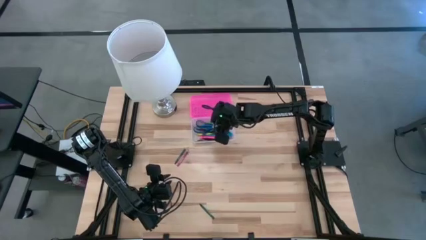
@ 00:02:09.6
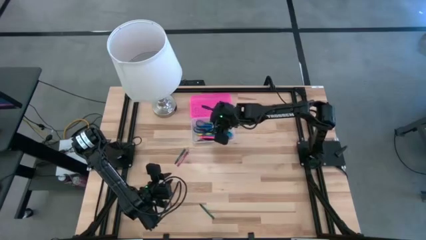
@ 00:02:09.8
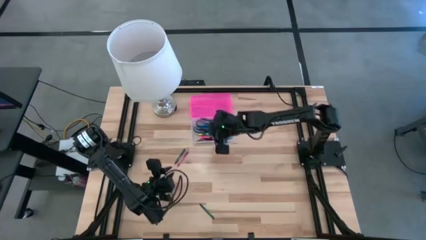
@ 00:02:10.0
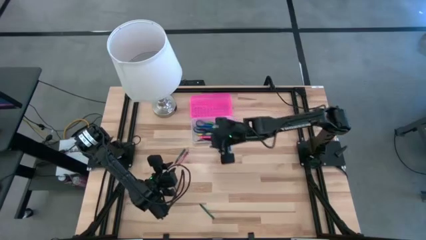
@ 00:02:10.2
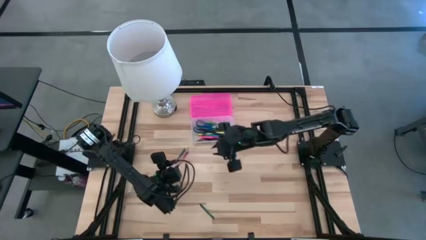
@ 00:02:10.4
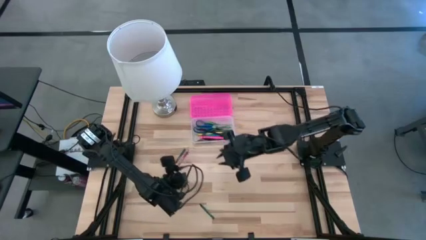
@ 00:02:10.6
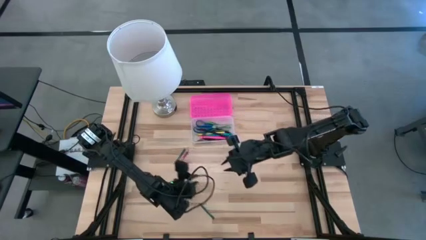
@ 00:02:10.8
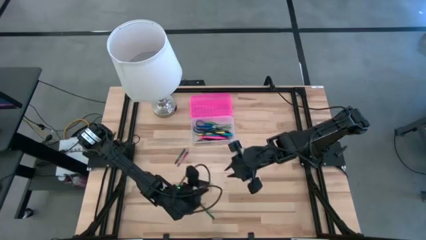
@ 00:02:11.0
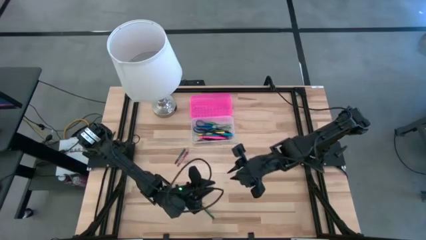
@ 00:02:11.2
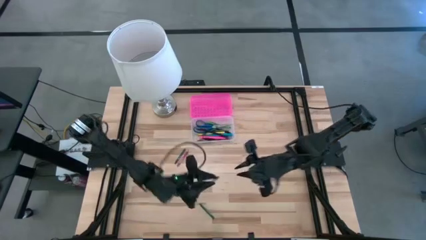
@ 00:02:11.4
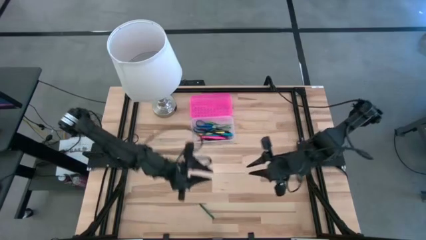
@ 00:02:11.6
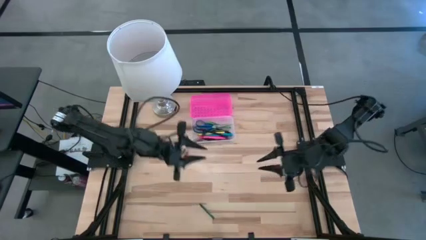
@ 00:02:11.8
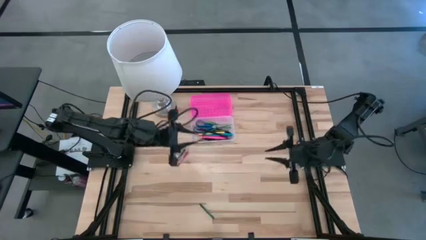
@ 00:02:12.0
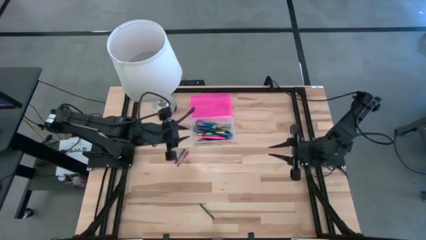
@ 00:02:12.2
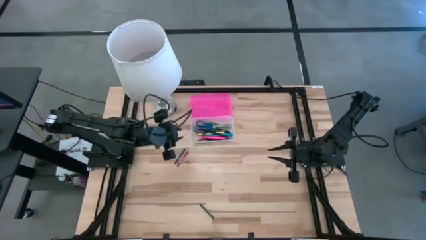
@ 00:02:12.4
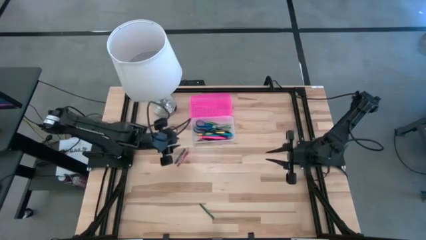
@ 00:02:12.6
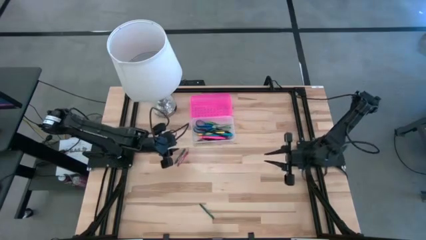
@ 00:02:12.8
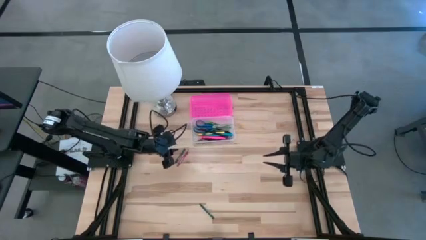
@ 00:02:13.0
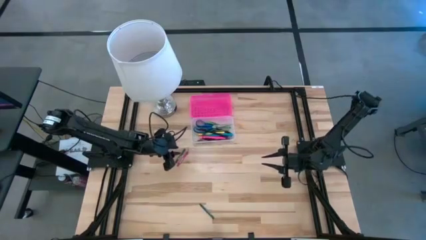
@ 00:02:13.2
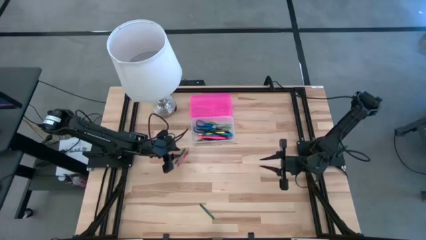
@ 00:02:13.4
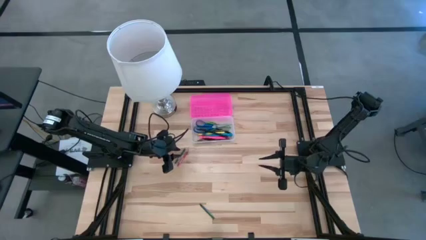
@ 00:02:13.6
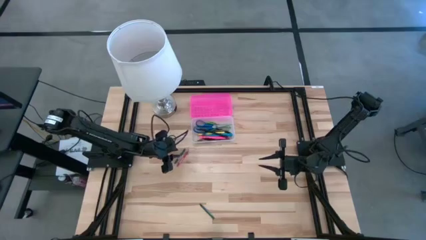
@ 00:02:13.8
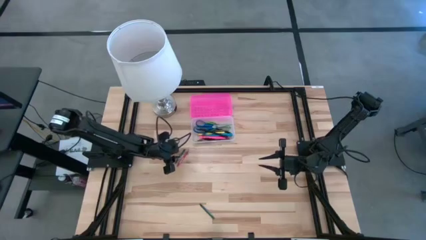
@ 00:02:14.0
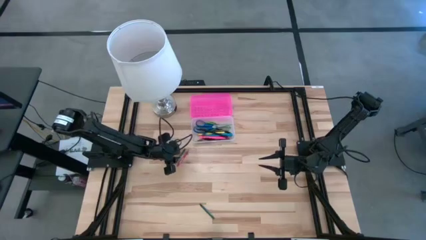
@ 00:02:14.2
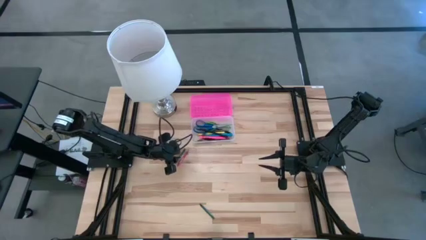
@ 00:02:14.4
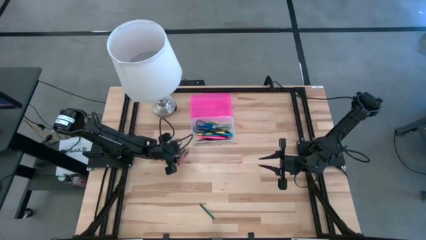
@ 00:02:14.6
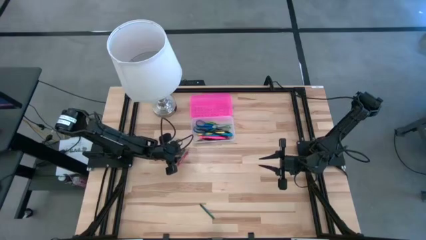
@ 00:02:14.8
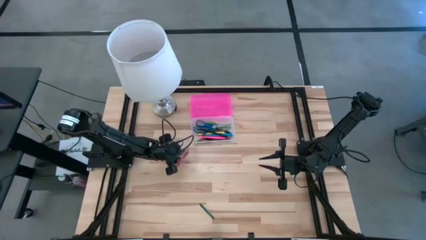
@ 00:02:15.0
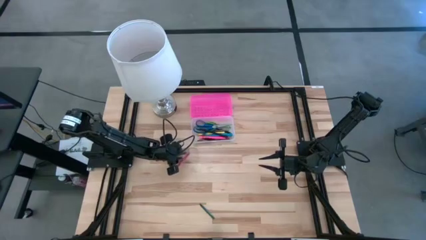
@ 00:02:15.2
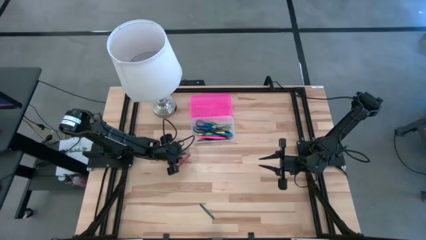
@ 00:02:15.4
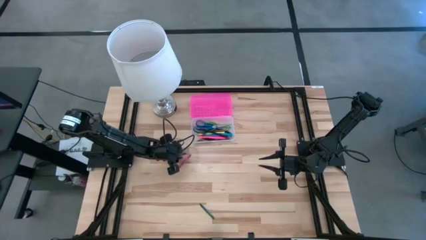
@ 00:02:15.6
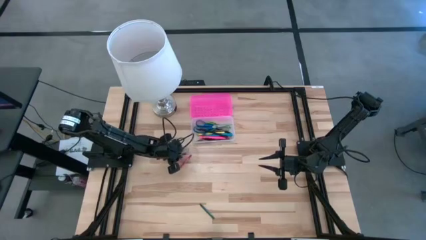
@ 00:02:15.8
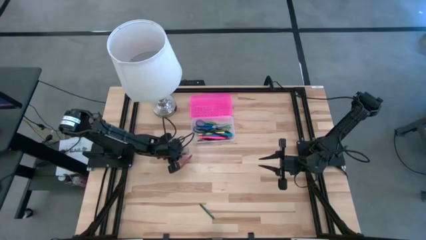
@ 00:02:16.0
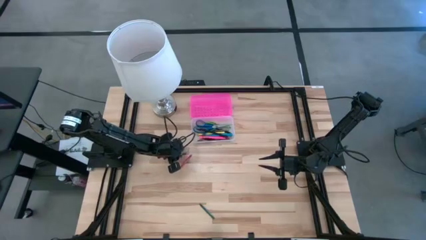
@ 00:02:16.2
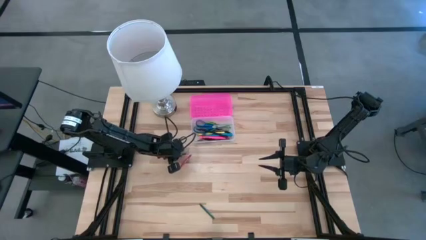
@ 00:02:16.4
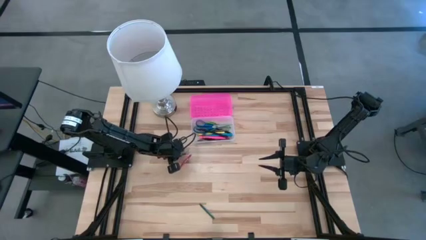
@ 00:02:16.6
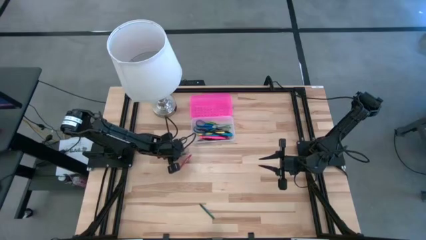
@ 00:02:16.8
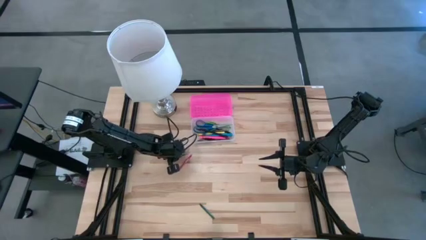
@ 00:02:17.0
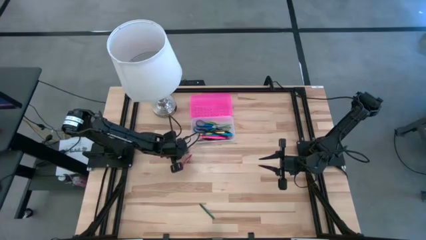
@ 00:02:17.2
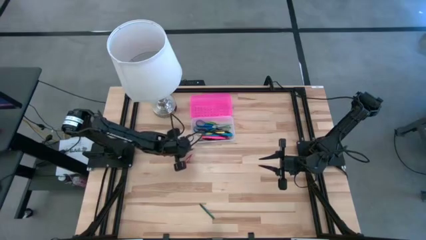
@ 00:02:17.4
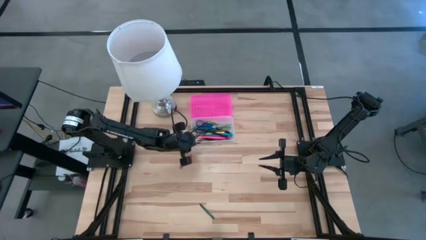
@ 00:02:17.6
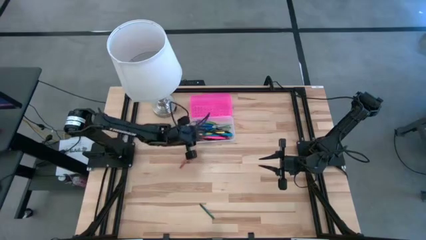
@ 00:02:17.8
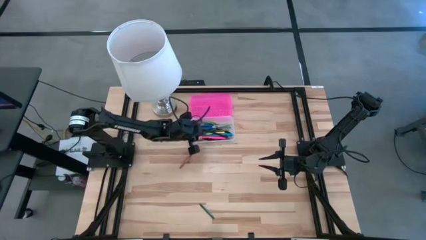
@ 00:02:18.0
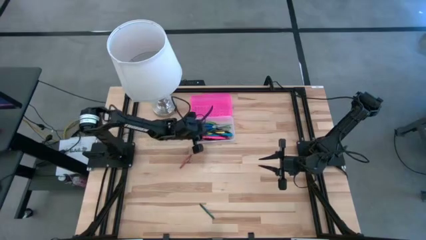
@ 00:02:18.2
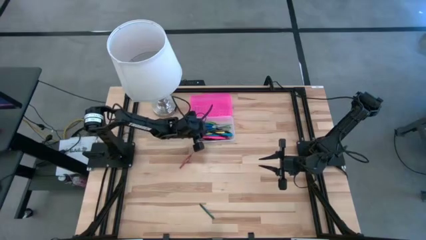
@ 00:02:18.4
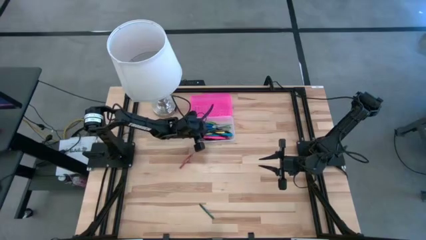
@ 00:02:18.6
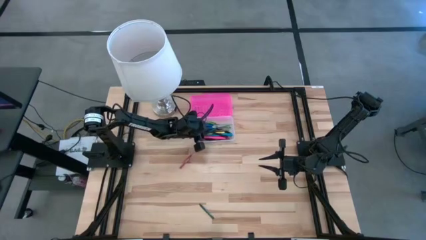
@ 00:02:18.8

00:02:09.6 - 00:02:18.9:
Task: Pick & place school supplies into a supply box
Put the green crayon into the pink supply box

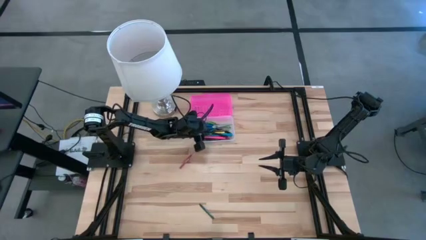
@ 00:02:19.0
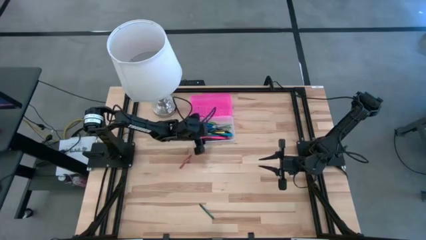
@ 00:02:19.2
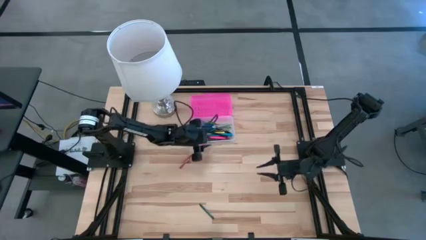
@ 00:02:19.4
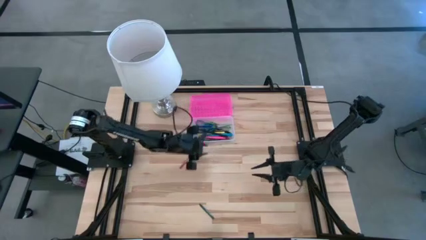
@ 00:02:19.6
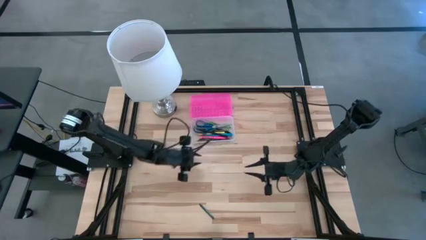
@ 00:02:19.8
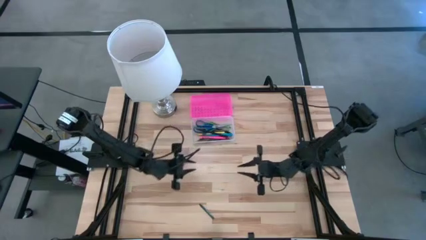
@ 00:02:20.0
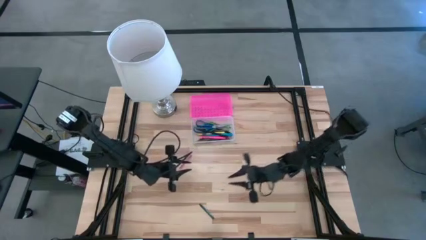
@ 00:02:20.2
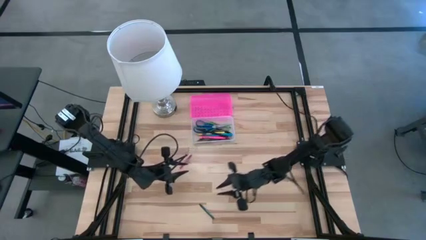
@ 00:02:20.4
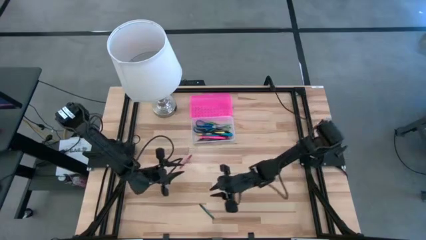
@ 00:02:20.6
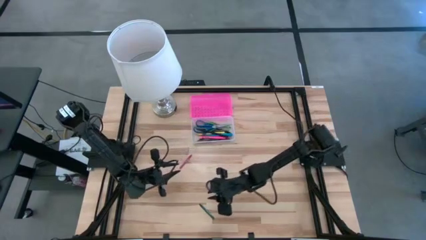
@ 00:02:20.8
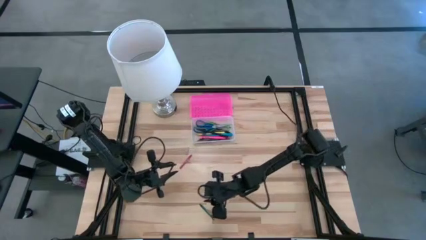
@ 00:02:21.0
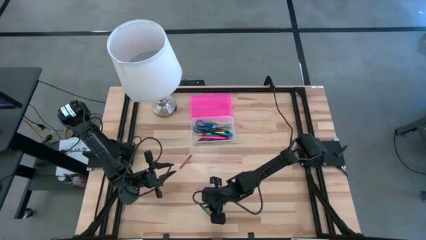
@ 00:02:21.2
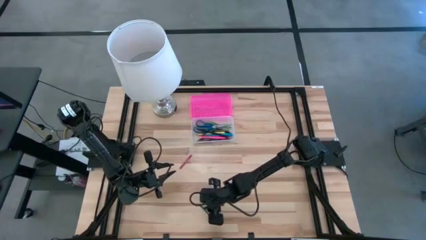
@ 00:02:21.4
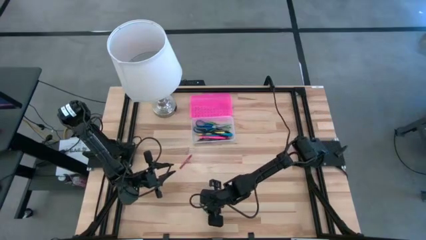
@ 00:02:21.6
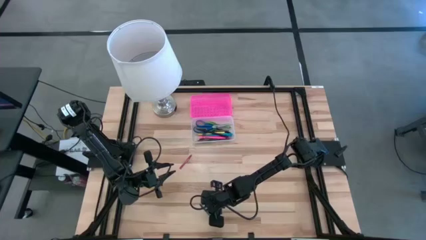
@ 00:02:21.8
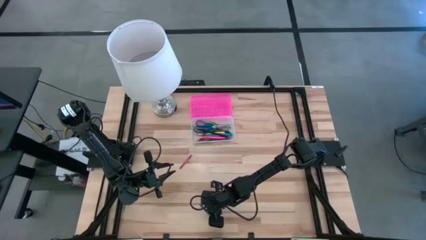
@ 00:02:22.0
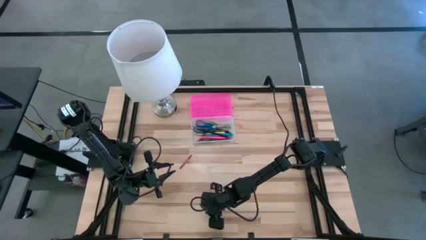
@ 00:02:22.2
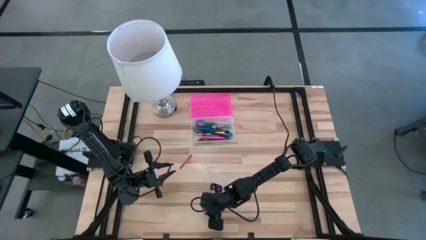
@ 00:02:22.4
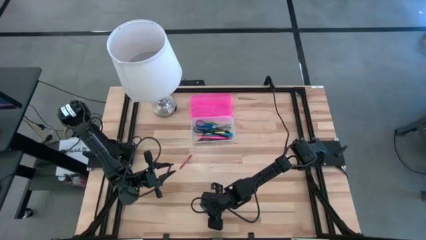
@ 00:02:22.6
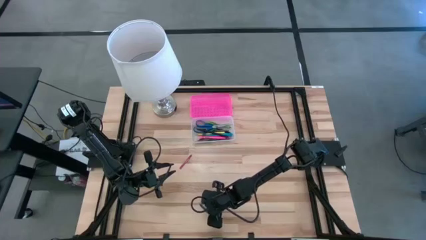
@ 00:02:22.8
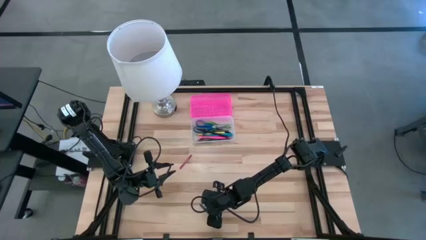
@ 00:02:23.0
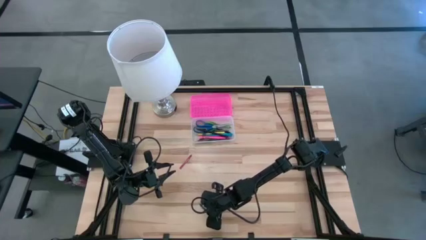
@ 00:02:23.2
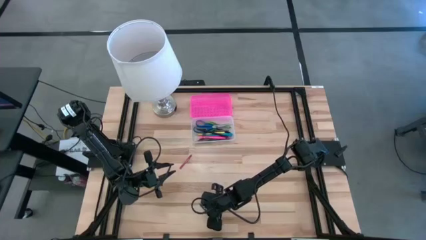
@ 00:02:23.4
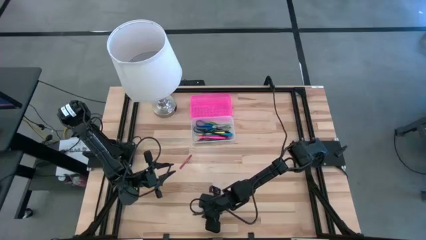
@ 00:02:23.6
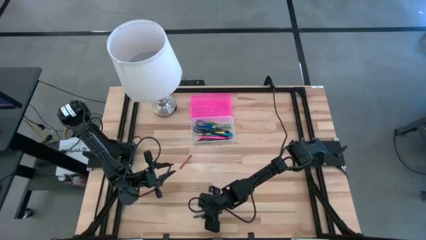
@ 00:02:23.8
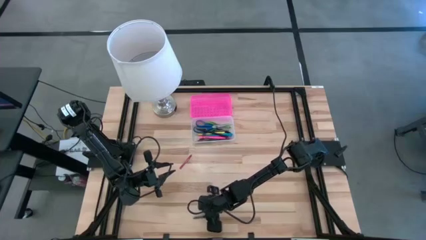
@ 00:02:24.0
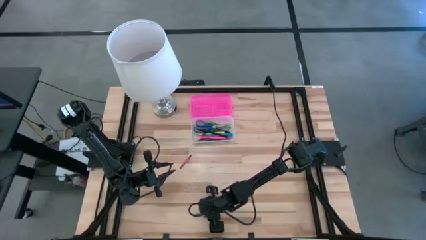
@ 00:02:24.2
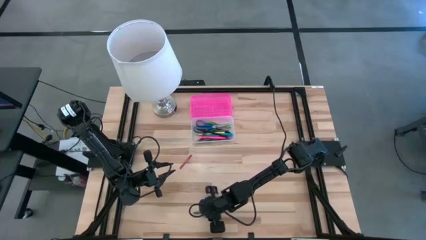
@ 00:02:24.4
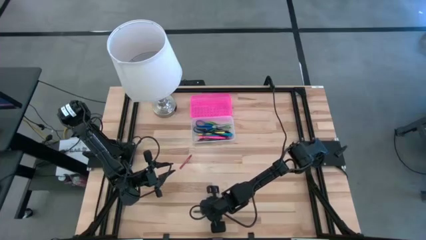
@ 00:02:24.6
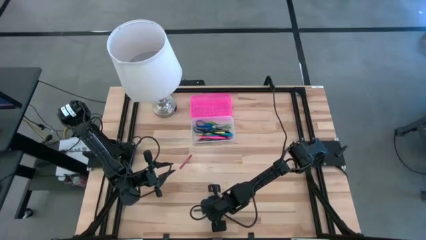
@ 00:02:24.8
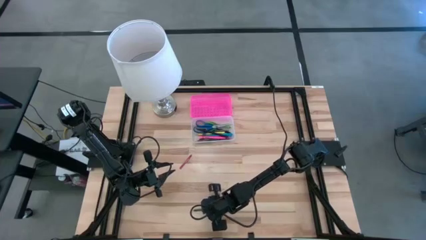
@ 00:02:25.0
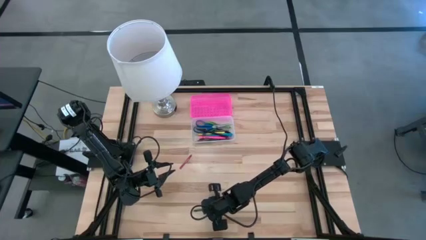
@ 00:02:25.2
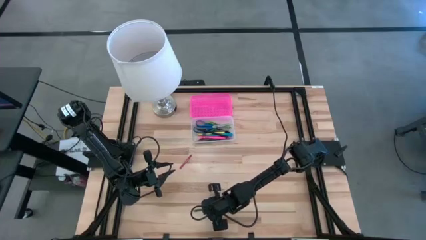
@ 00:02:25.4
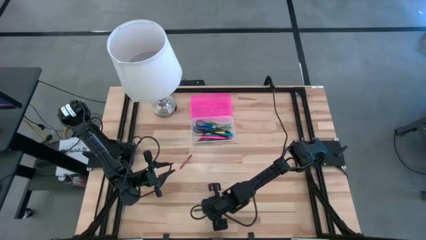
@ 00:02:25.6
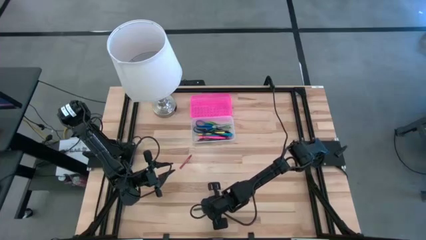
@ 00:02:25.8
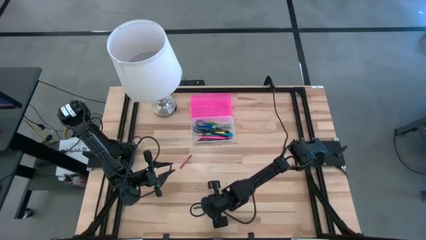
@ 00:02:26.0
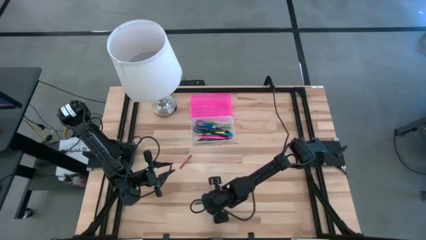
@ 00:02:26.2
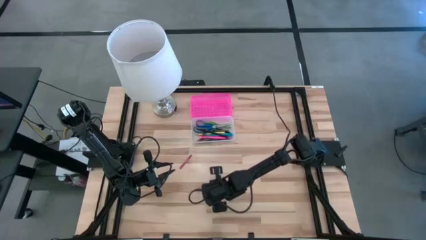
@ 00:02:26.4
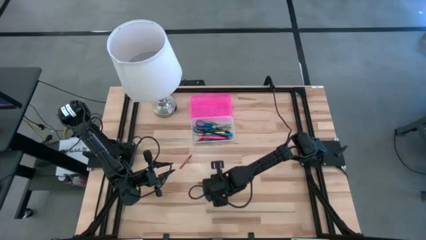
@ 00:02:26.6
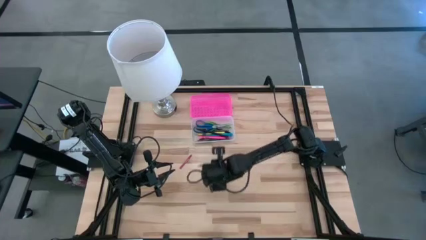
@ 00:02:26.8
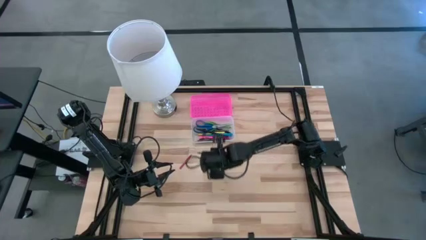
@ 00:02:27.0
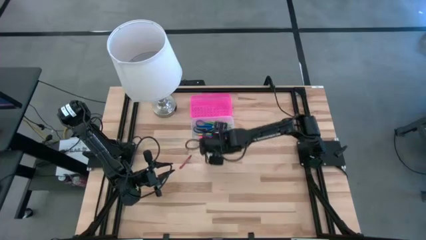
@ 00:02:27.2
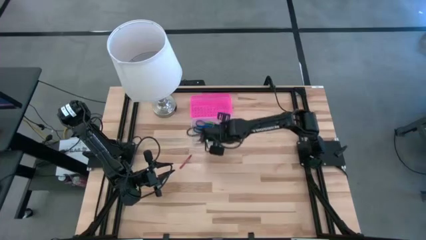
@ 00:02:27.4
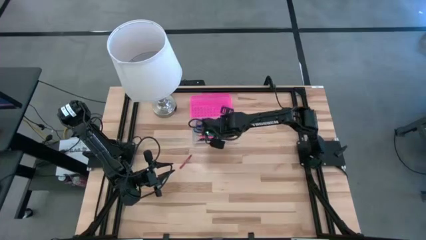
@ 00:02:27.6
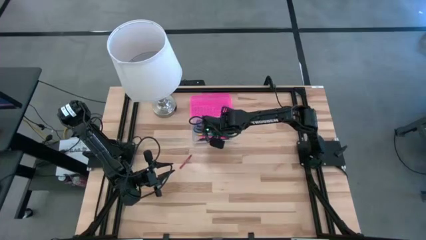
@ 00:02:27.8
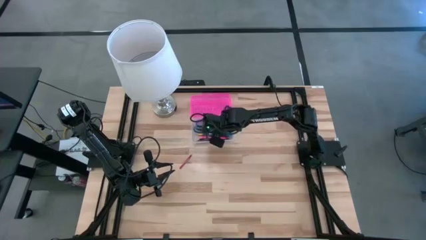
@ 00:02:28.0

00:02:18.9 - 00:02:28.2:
Put the green crayon into the pink supply box
